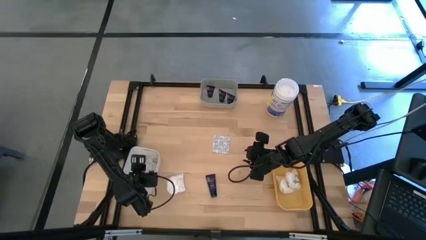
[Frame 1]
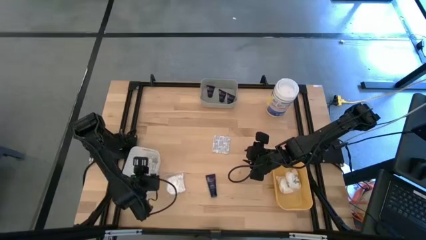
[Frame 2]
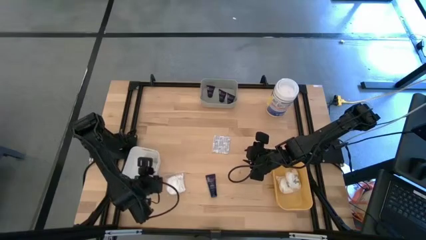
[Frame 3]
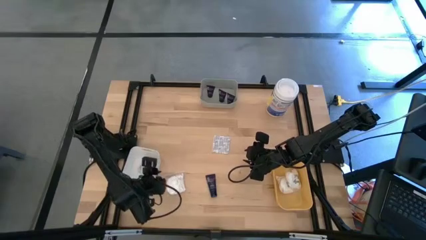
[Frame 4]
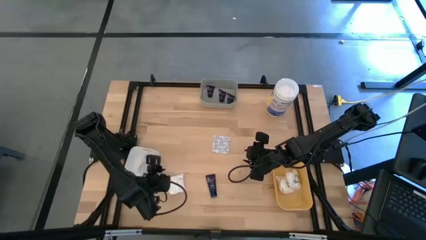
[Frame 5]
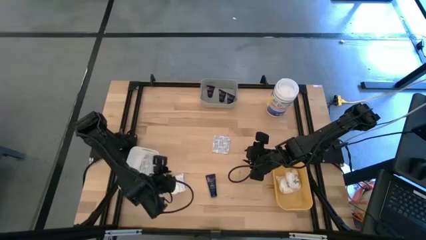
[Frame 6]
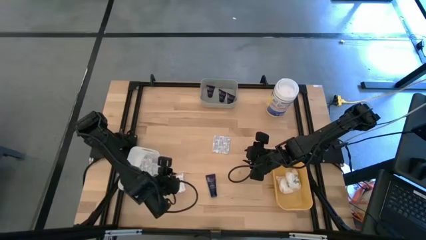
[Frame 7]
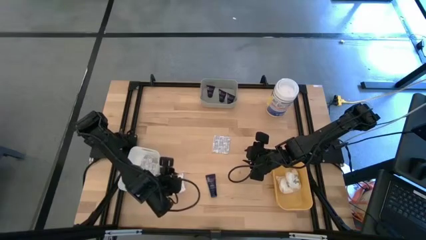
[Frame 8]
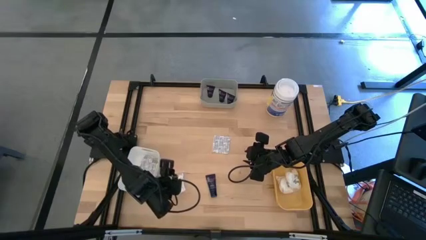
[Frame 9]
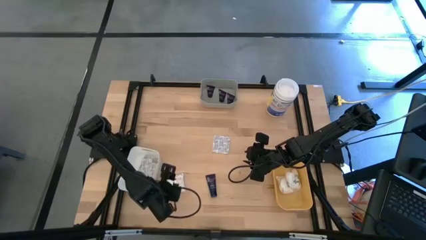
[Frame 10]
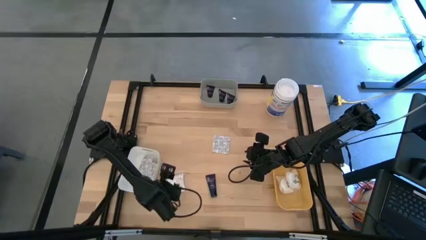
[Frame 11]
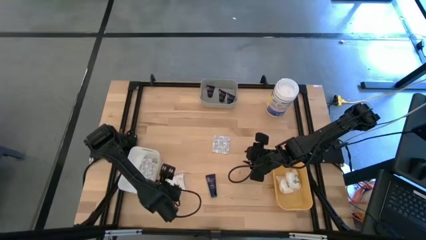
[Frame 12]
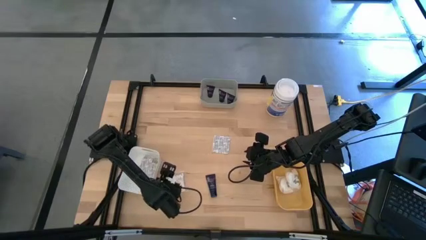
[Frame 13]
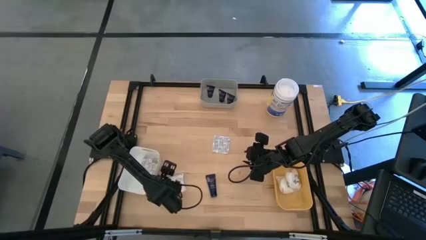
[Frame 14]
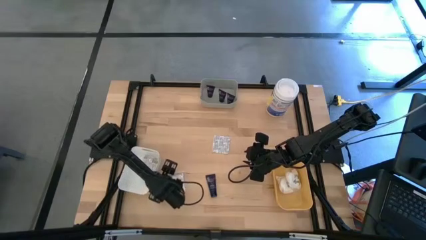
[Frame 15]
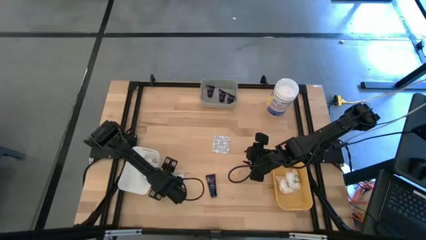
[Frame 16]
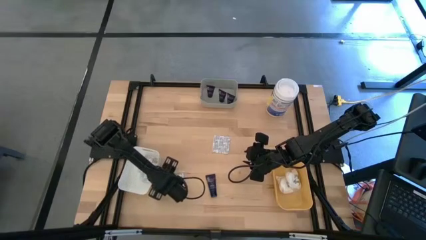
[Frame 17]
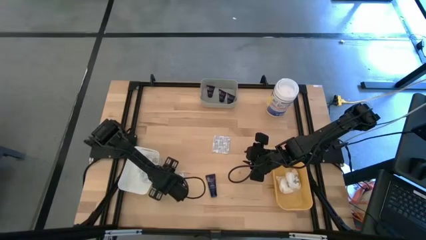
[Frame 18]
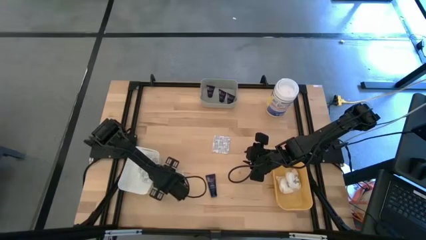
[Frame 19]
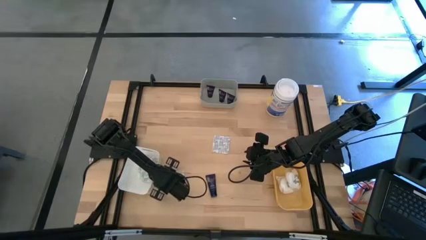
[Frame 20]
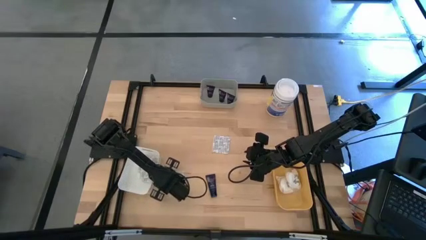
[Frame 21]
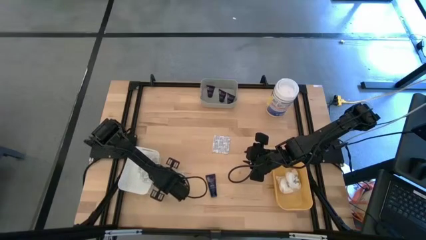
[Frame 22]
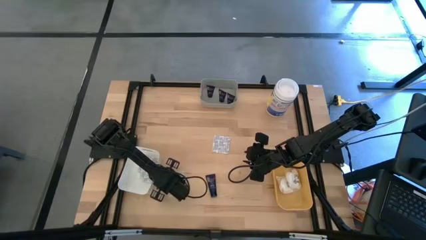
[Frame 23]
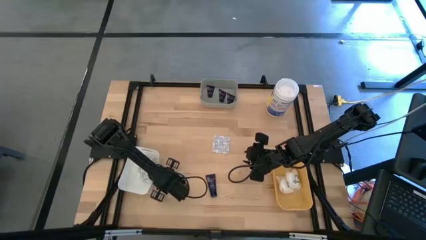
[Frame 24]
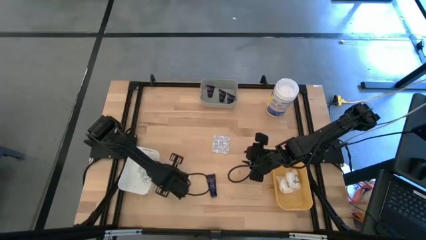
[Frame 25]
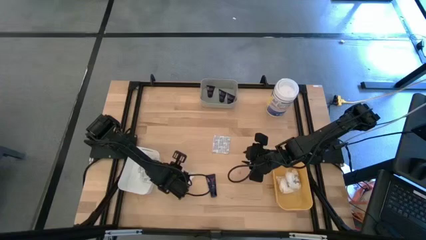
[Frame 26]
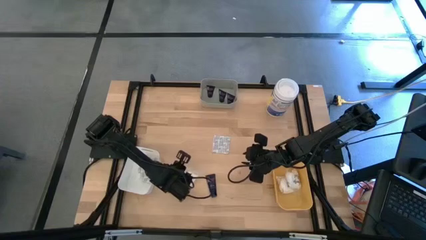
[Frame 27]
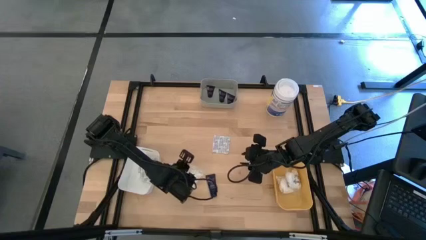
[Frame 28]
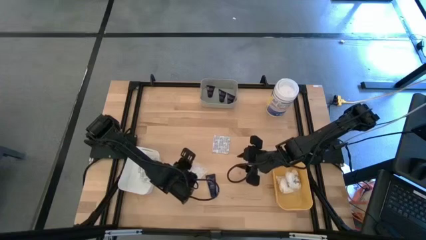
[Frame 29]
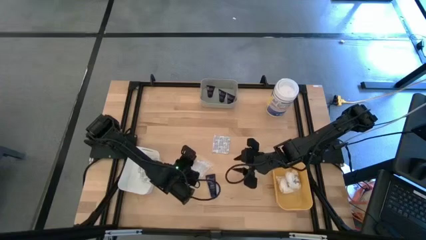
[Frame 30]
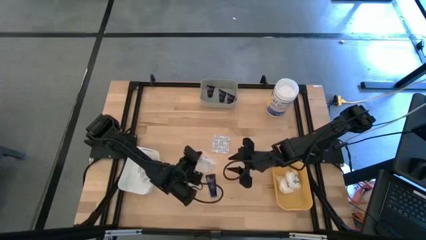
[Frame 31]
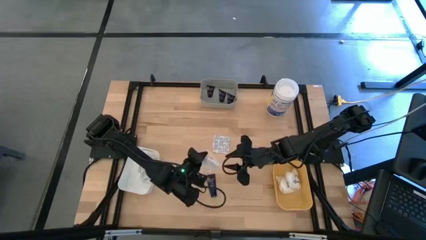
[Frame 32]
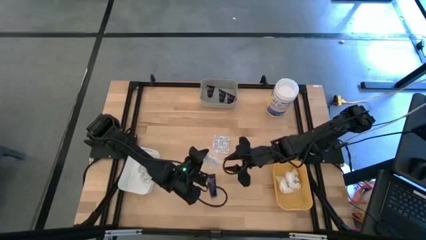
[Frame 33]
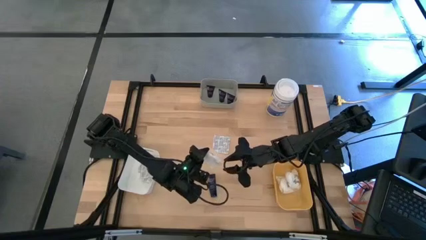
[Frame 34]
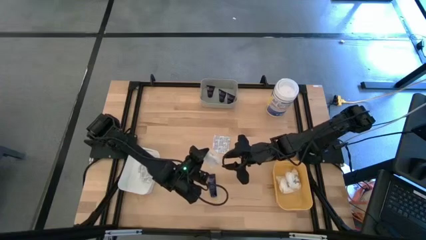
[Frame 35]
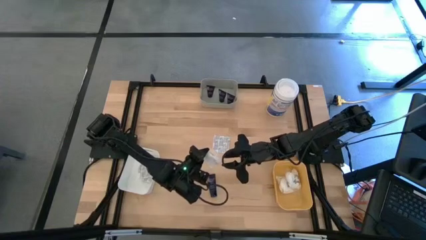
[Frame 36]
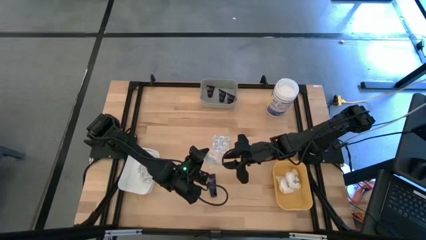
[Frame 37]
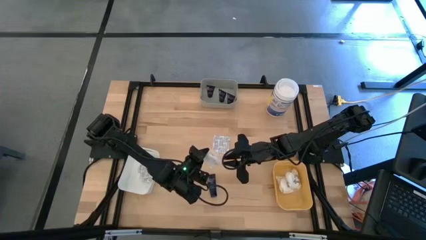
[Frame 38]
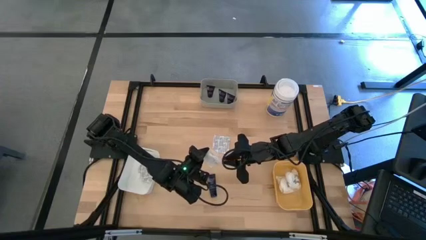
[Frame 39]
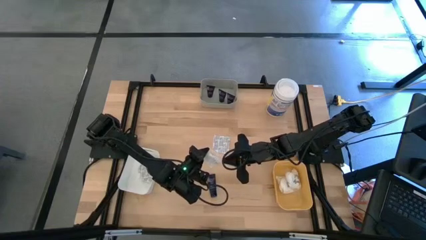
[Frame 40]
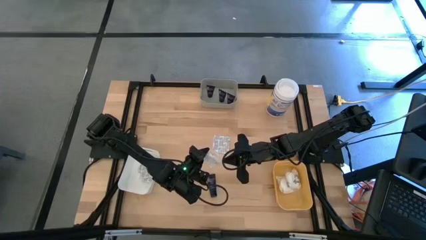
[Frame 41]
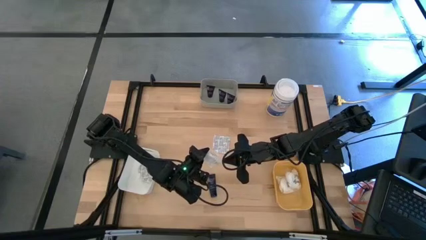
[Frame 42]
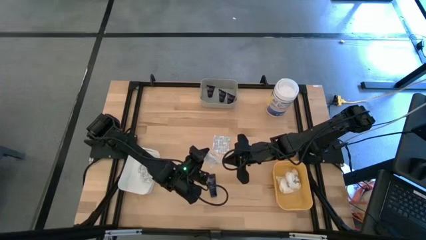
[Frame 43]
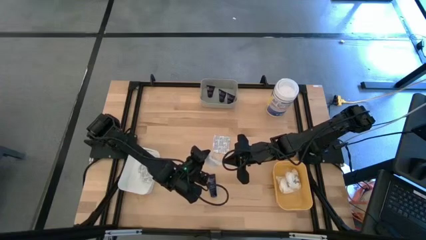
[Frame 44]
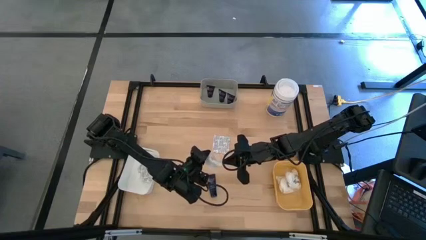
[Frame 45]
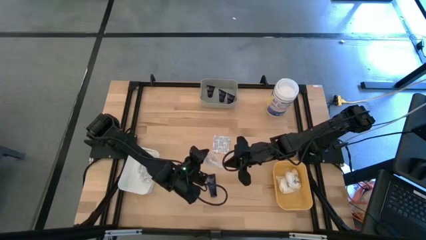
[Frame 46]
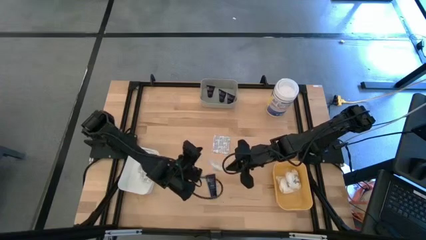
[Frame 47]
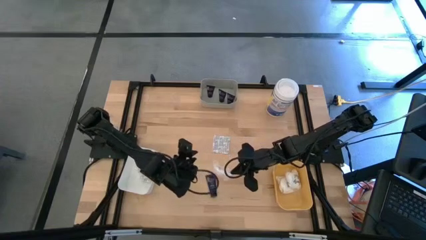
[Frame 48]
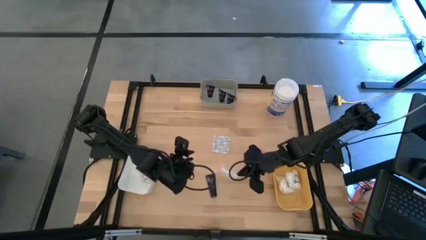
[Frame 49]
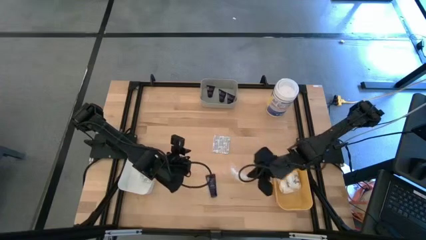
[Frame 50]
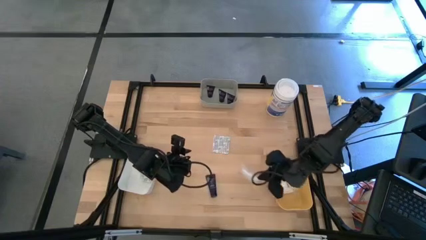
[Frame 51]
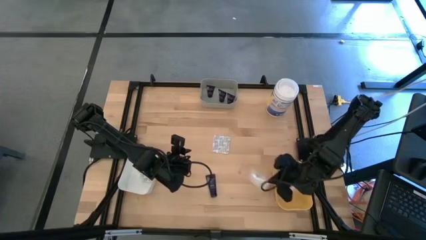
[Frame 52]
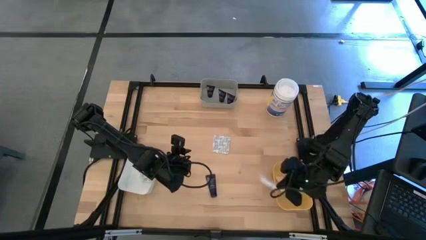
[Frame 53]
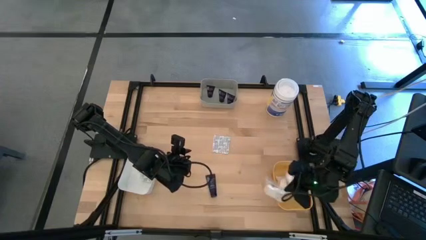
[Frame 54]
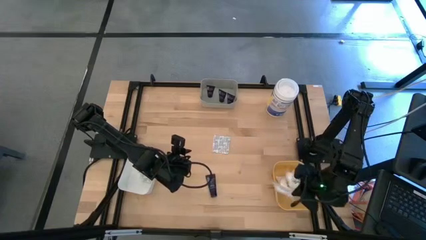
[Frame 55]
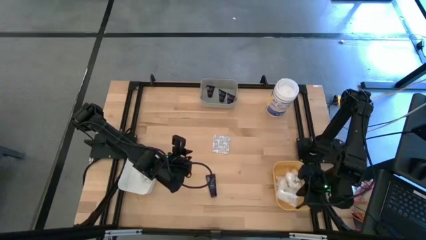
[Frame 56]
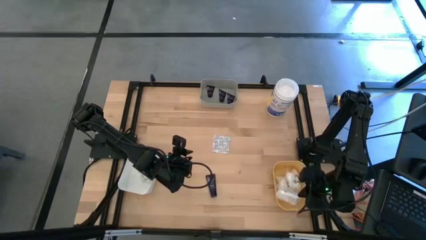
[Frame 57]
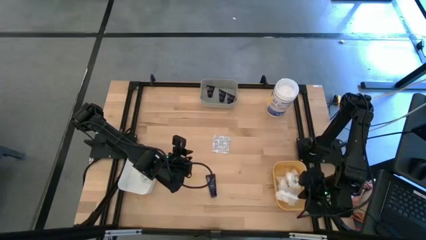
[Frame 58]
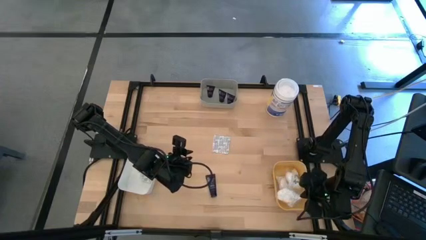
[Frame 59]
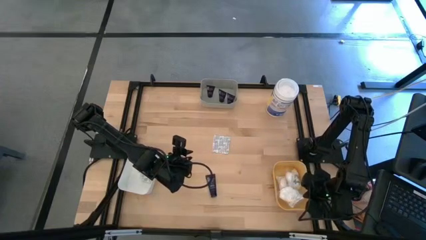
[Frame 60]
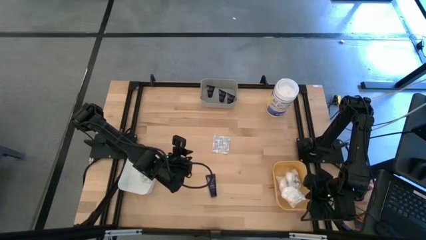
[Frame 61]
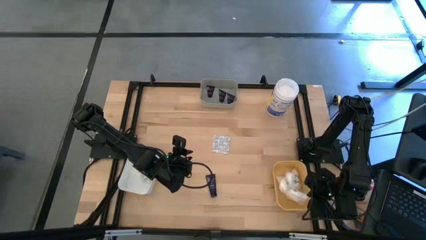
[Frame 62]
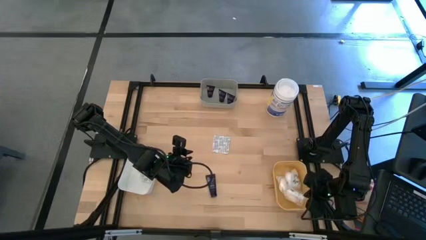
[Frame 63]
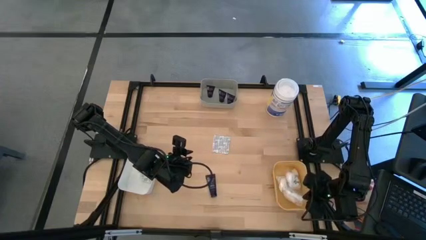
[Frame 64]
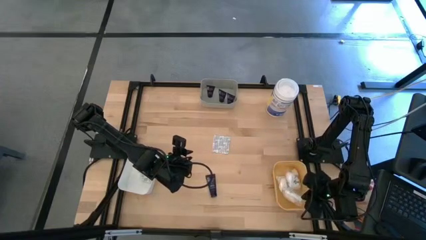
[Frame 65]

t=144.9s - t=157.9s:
Task: Pick & Place Travel size toiletries
Put the cotton pack into the yellow bin

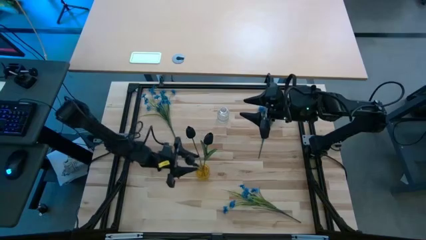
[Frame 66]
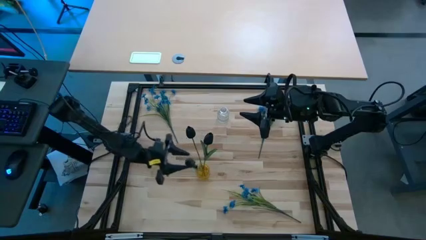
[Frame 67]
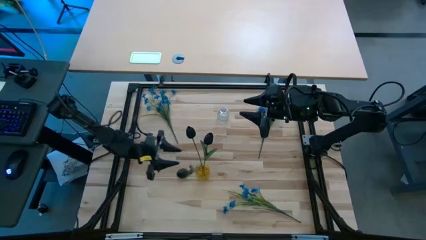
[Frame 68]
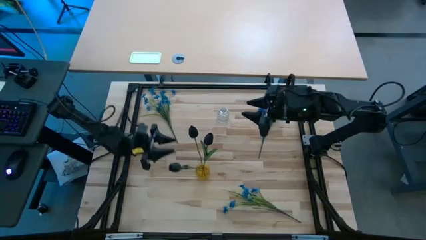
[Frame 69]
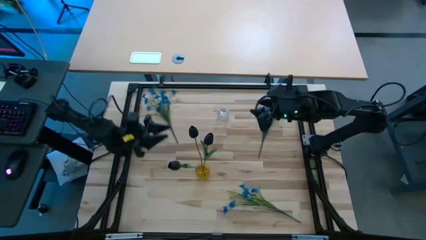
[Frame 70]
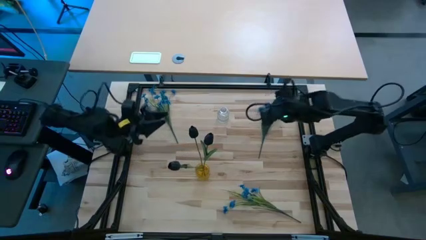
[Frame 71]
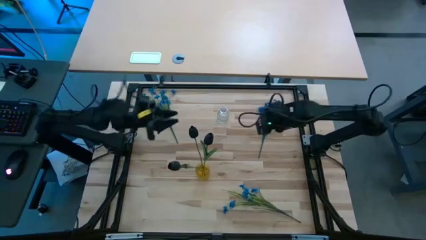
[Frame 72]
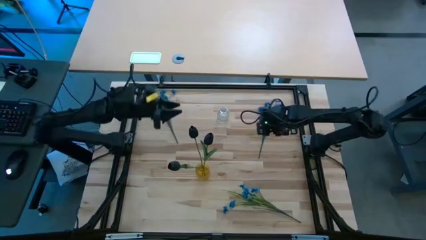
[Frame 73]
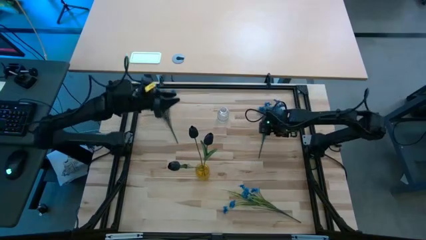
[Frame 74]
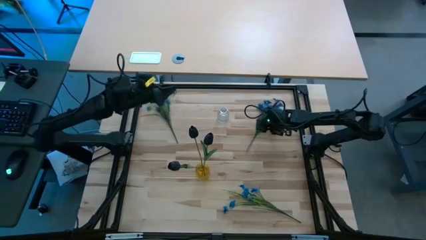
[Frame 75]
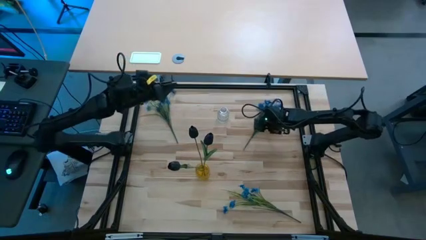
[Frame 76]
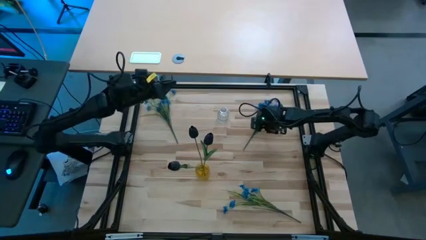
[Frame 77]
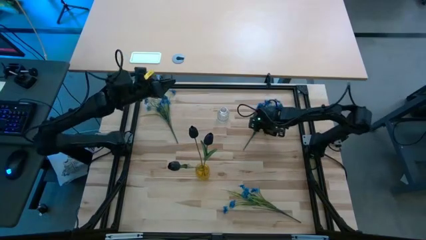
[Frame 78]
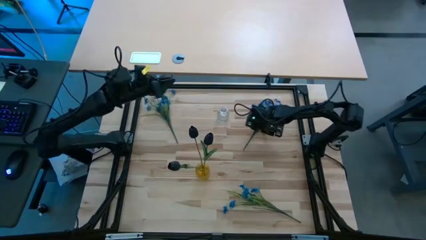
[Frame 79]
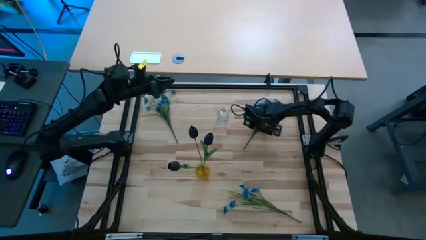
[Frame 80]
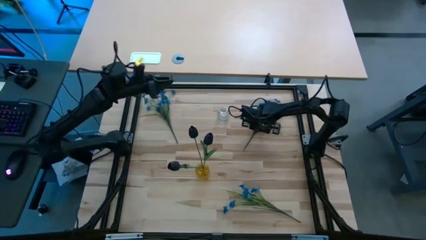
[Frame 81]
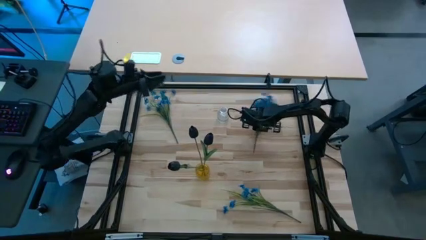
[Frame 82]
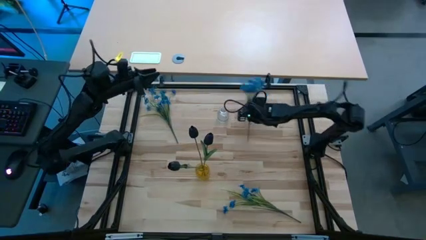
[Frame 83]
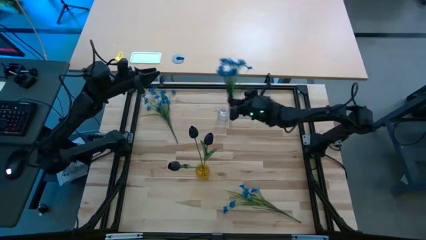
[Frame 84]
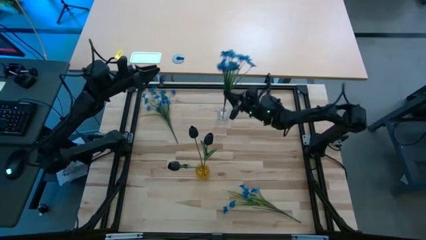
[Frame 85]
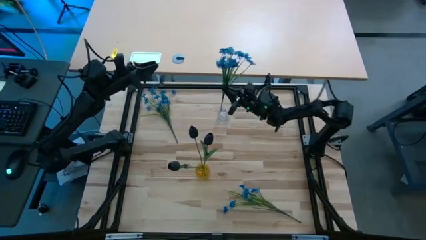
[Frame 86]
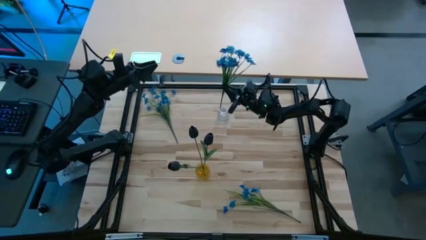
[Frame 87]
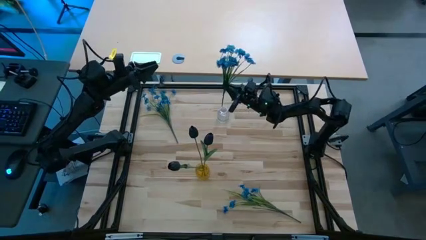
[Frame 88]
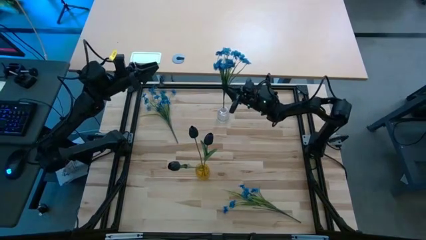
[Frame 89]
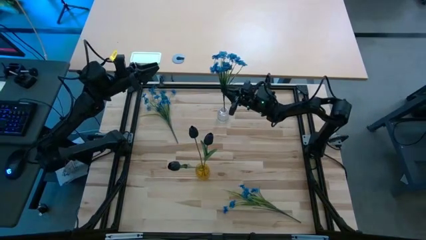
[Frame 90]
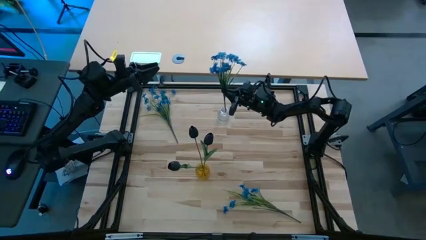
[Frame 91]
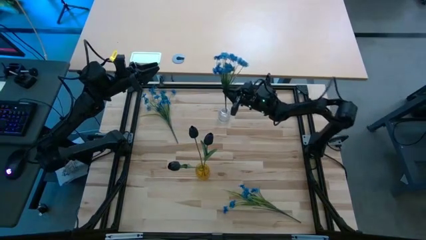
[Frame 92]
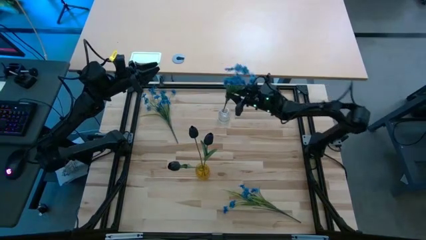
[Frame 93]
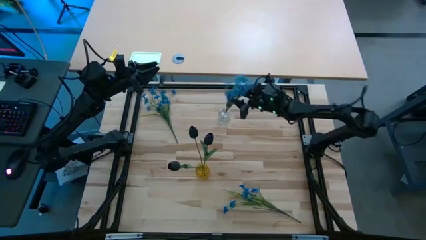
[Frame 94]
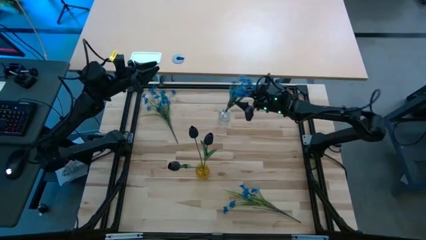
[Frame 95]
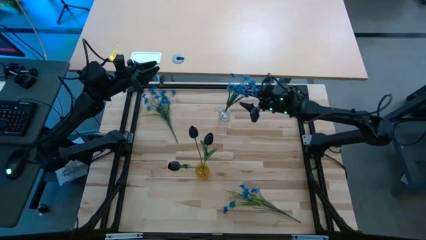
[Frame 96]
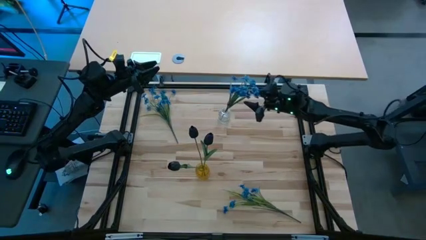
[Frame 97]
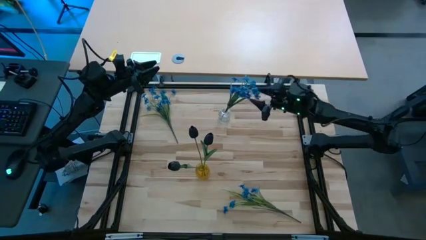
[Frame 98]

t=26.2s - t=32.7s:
Task: Sort flowers into vase by color
Put the top right blue flowers into the transparent vase
